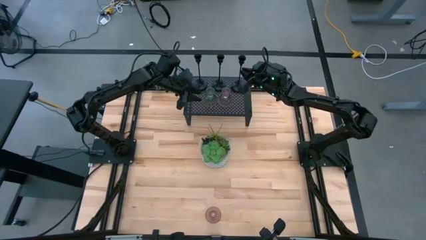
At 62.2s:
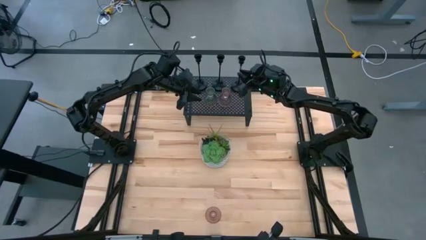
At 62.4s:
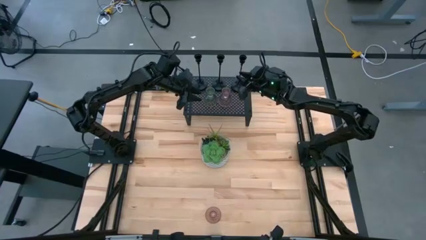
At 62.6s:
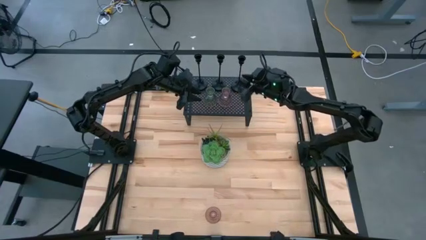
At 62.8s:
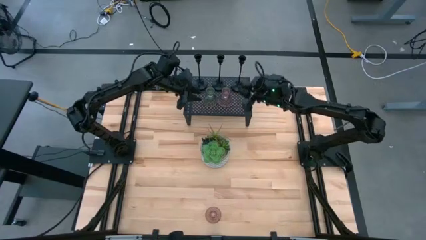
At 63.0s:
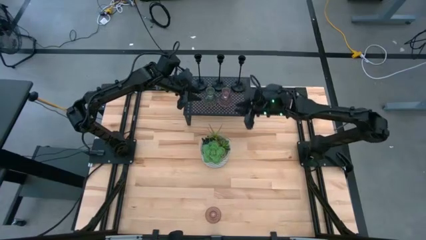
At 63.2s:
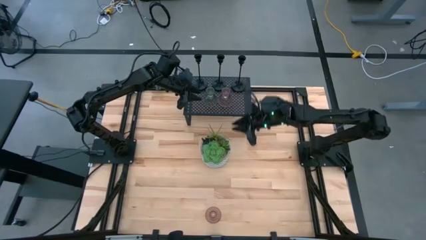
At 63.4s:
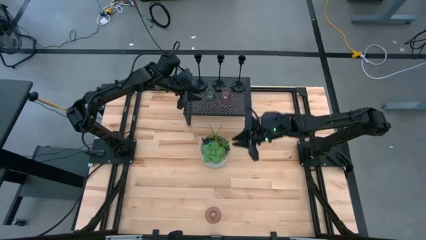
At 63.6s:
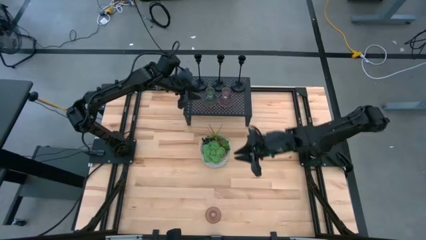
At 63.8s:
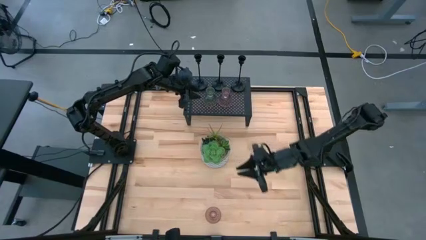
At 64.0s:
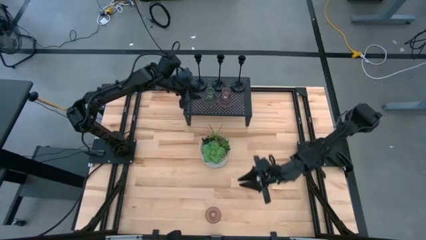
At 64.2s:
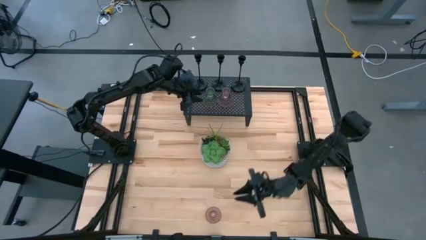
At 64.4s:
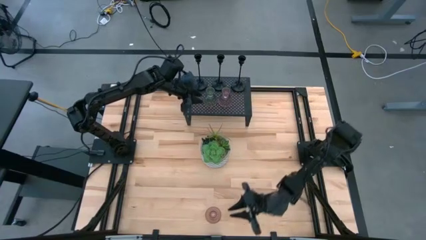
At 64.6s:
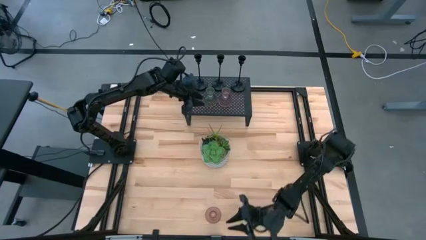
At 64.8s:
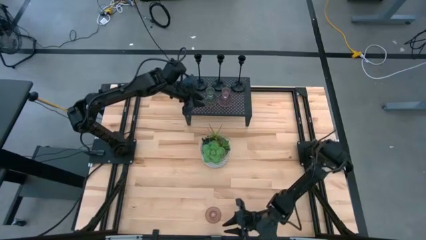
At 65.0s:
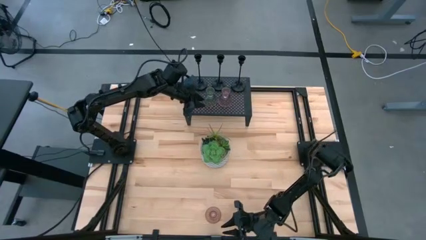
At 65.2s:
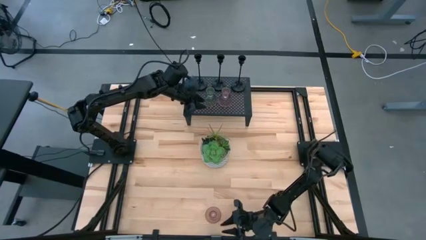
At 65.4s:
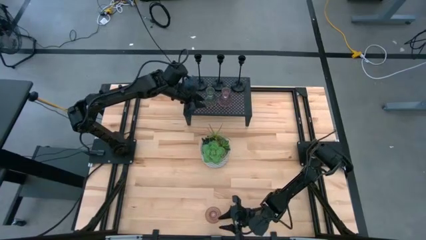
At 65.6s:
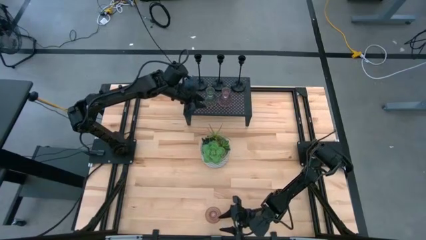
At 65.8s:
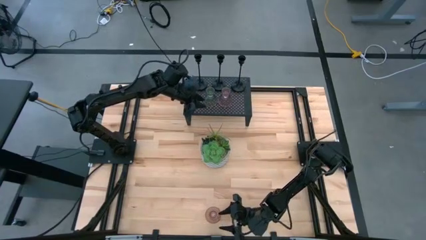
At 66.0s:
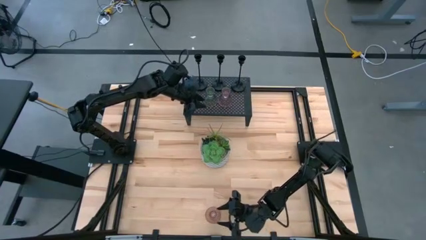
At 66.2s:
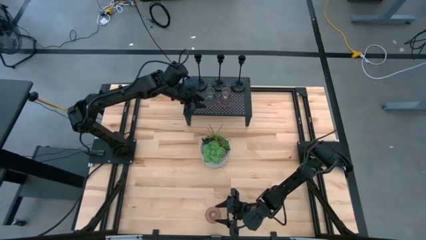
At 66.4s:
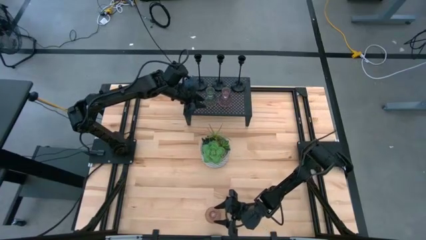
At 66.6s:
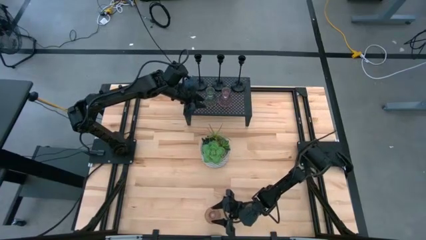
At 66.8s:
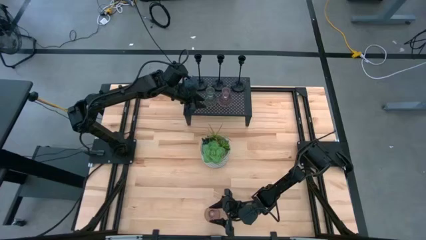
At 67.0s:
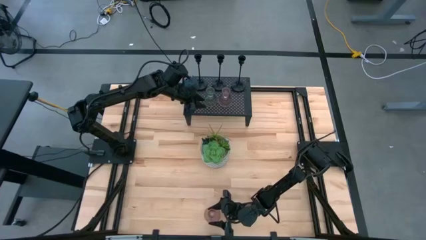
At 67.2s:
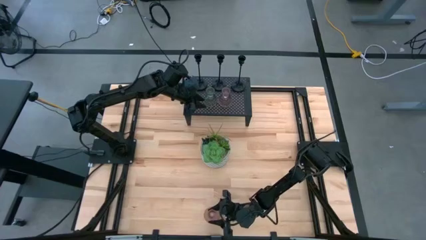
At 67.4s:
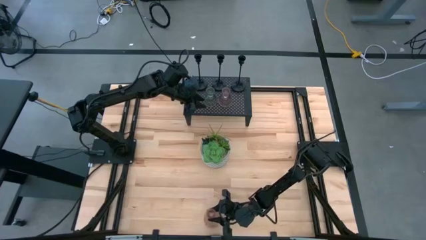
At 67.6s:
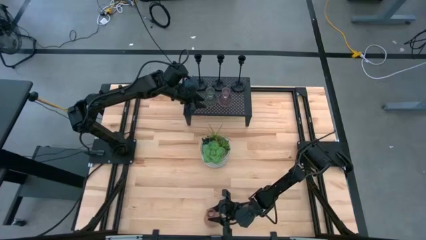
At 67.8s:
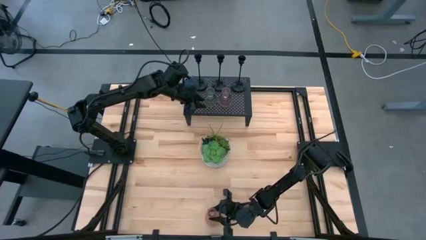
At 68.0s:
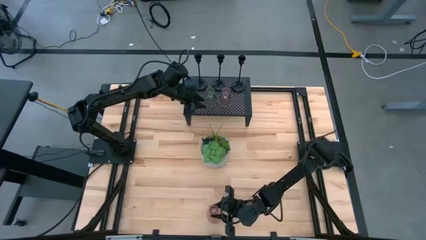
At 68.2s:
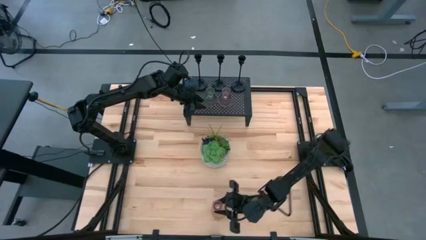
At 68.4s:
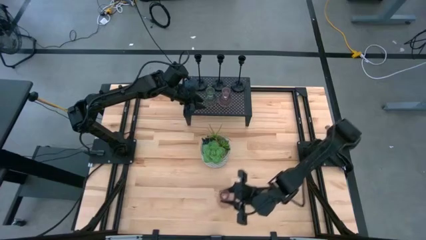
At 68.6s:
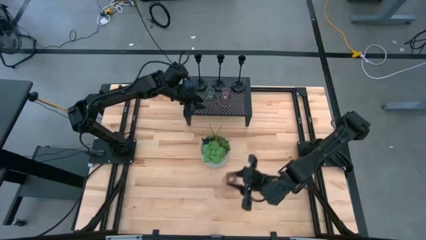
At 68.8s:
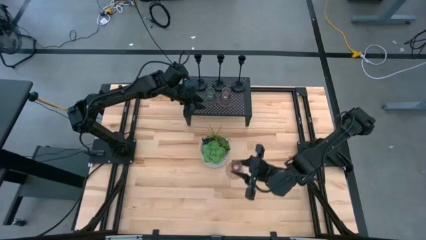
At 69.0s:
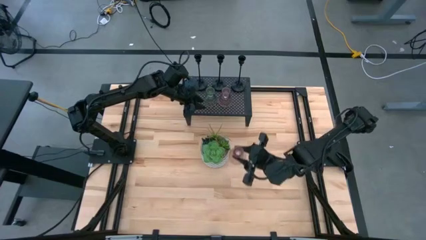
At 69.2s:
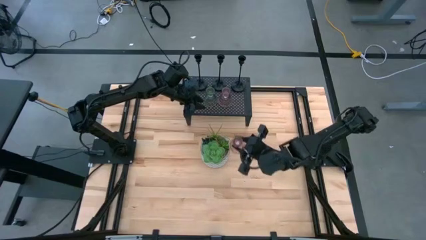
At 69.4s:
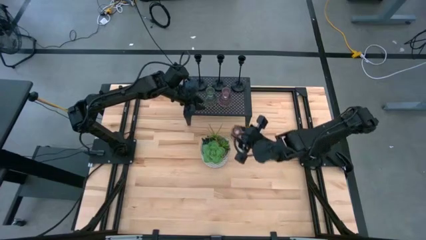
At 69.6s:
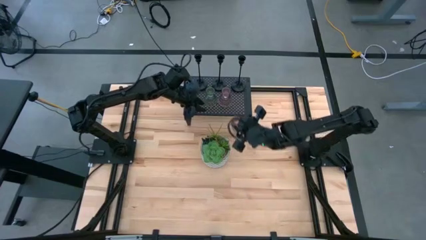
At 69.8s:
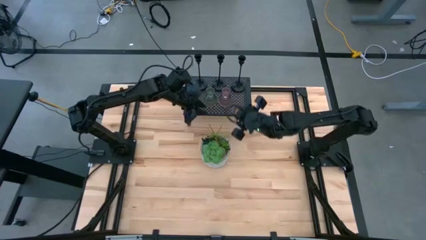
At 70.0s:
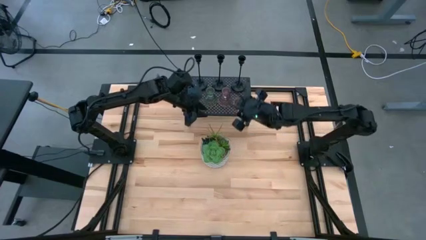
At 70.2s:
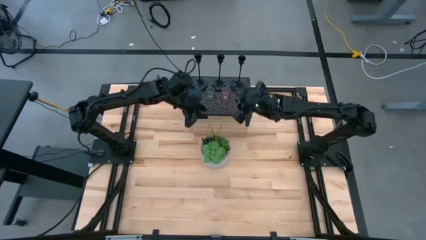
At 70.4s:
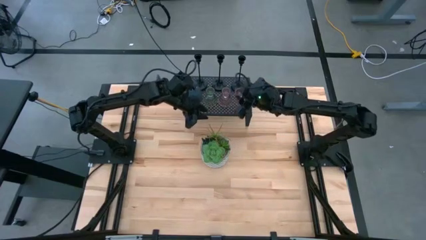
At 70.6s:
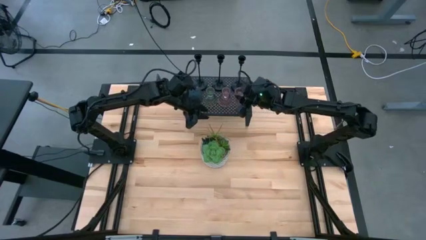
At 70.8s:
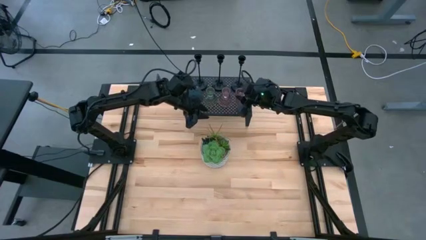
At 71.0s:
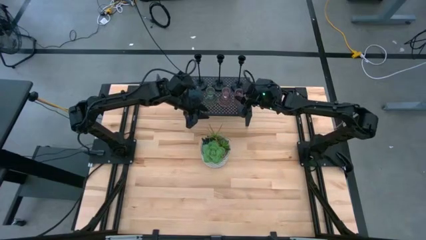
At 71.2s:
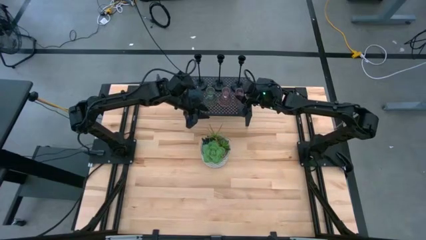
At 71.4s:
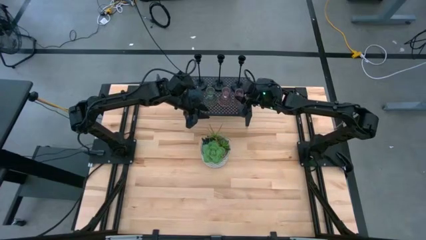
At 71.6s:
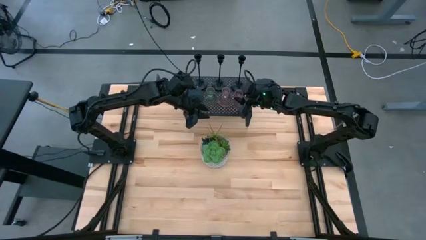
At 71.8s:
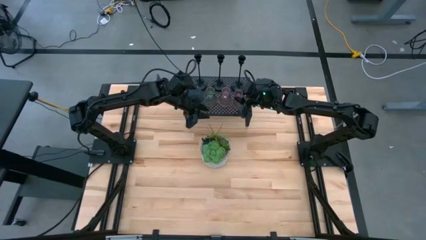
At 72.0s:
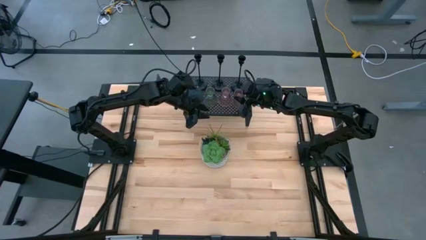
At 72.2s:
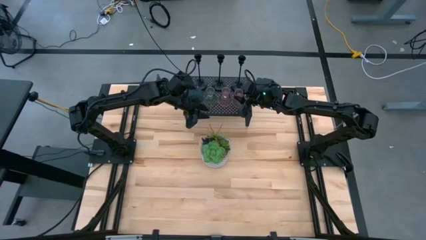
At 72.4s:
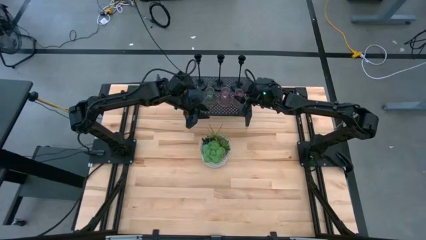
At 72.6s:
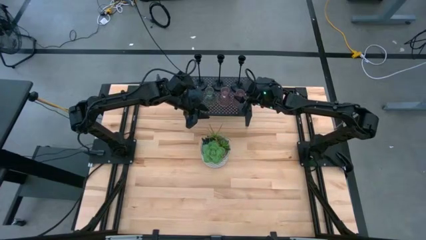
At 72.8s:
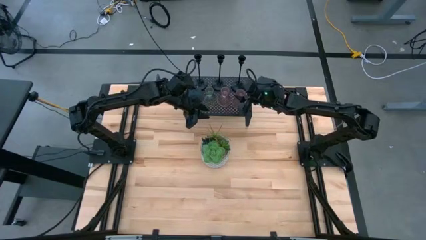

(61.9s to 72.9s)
Task: Pick & Place candle stick holders
Put the pink glass candle holder on the shelf aligned with the other pink and green glass candle holders

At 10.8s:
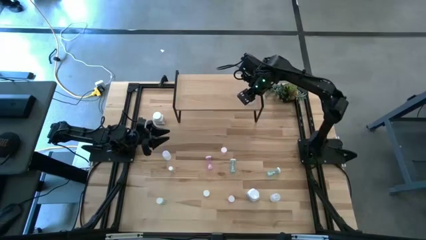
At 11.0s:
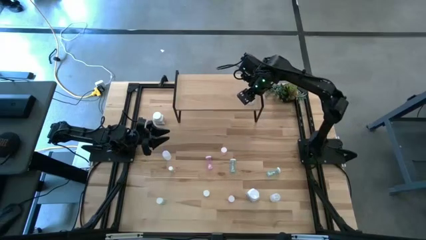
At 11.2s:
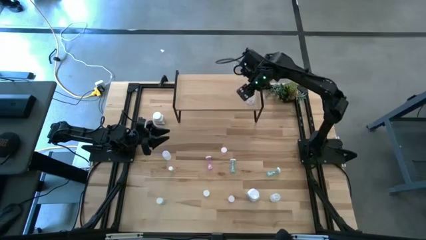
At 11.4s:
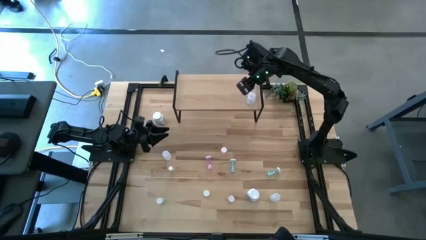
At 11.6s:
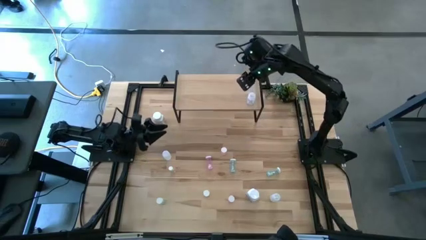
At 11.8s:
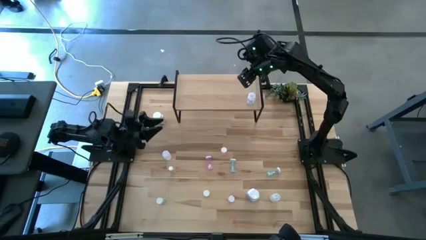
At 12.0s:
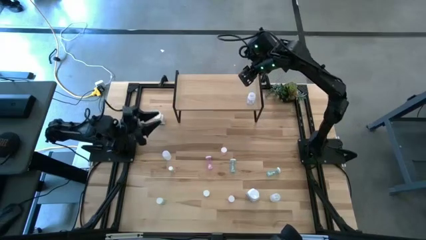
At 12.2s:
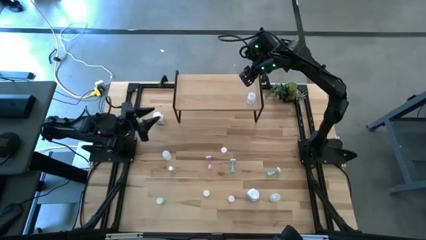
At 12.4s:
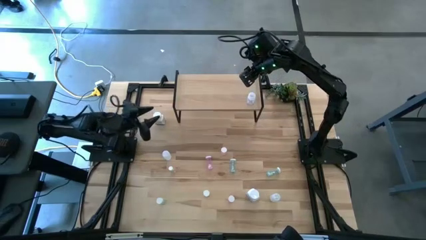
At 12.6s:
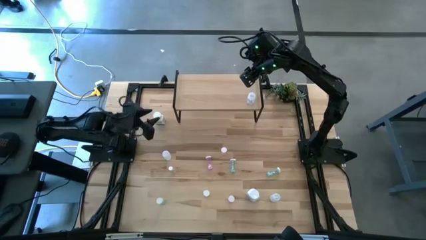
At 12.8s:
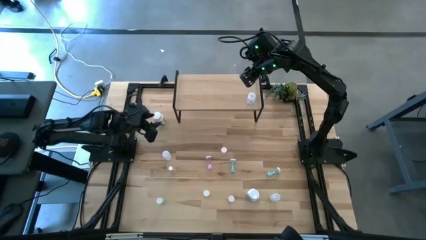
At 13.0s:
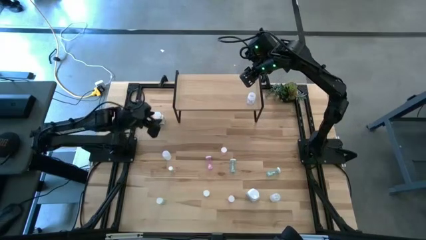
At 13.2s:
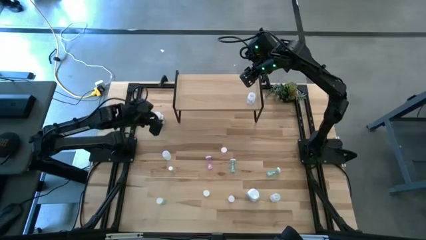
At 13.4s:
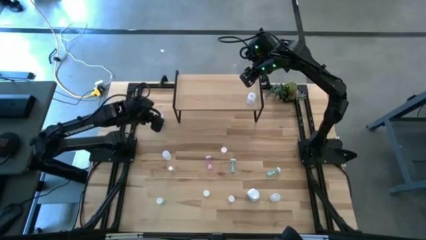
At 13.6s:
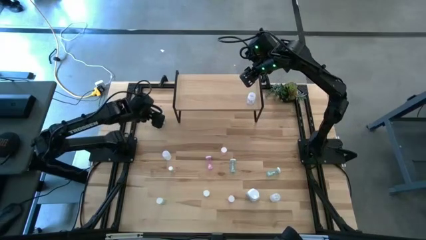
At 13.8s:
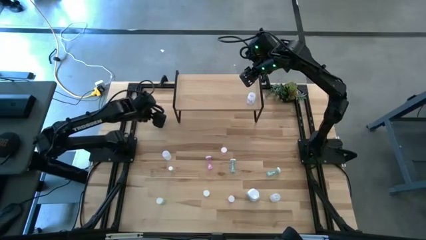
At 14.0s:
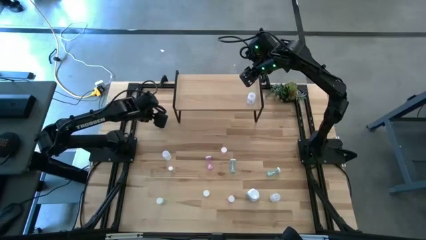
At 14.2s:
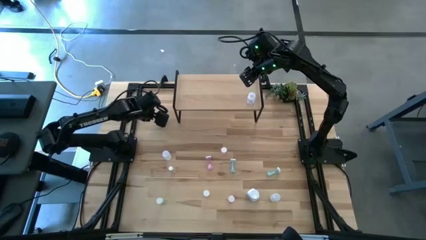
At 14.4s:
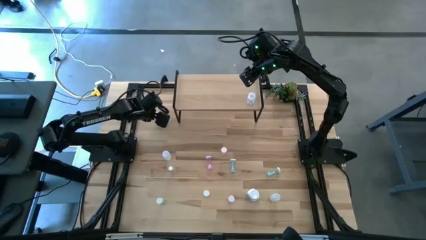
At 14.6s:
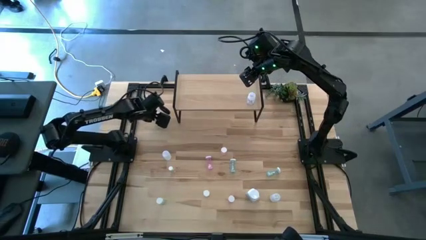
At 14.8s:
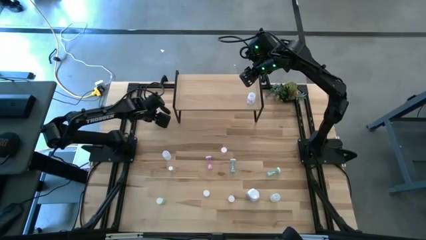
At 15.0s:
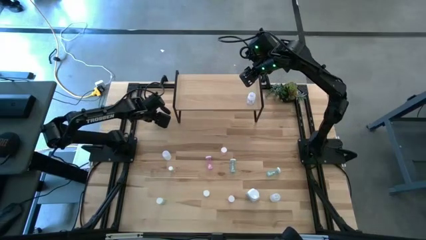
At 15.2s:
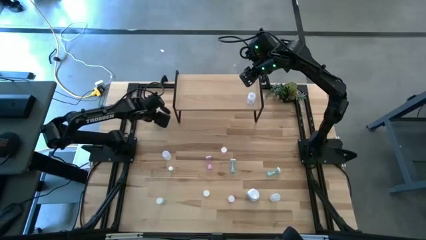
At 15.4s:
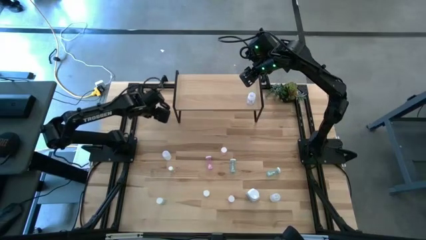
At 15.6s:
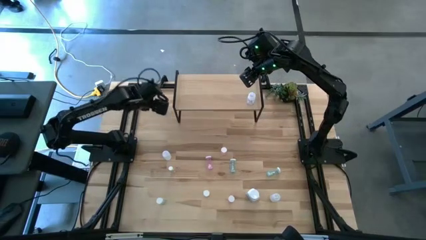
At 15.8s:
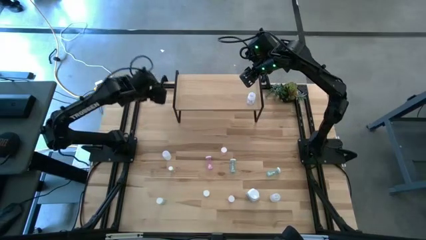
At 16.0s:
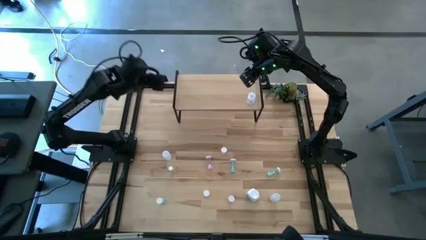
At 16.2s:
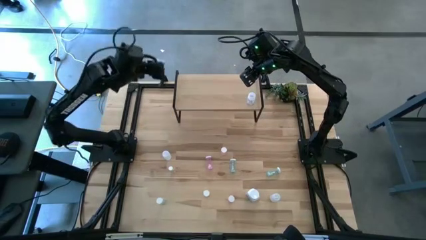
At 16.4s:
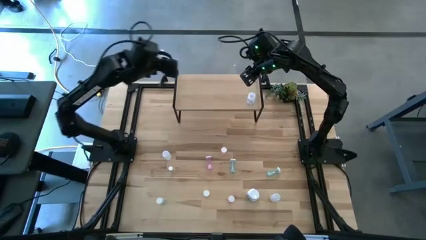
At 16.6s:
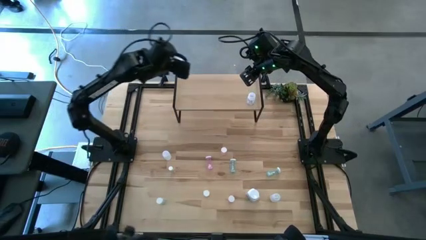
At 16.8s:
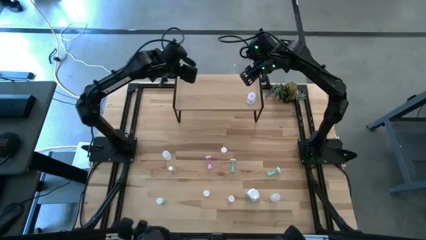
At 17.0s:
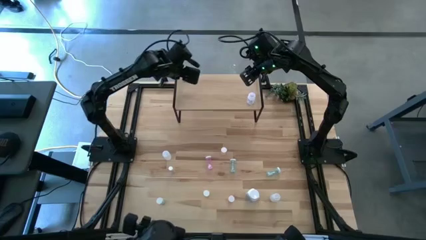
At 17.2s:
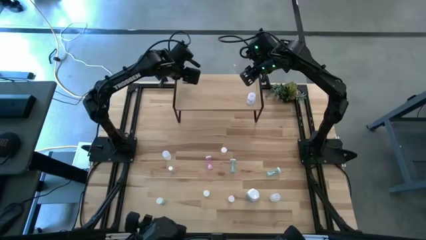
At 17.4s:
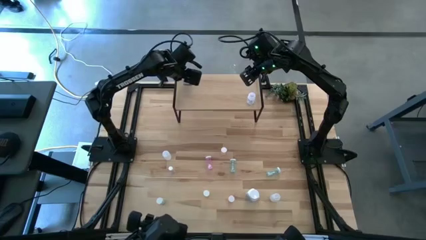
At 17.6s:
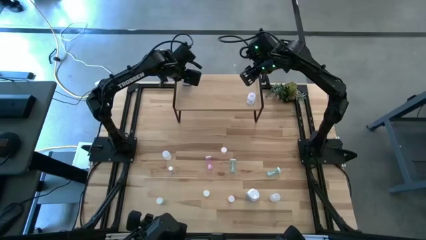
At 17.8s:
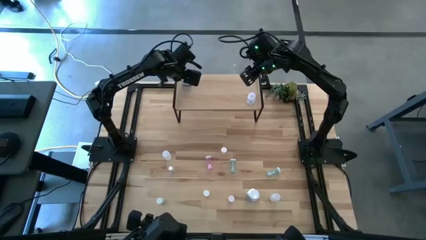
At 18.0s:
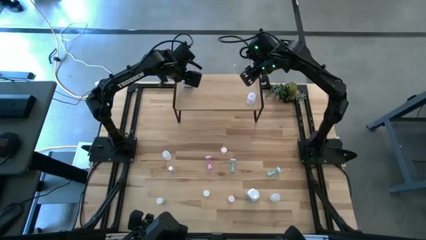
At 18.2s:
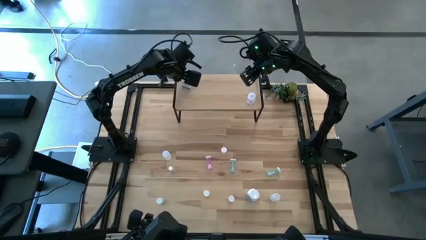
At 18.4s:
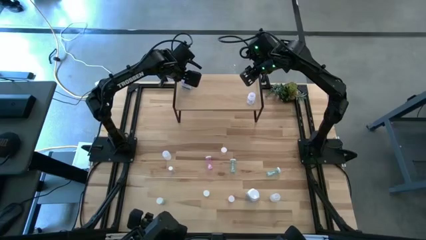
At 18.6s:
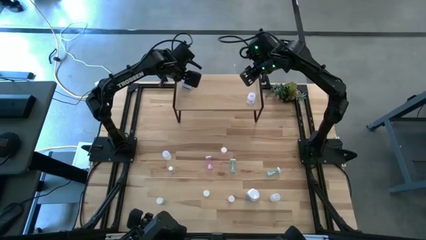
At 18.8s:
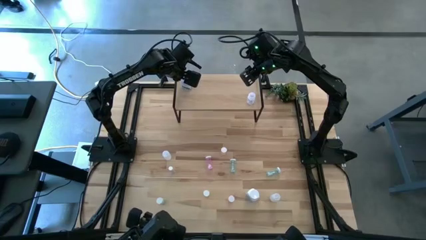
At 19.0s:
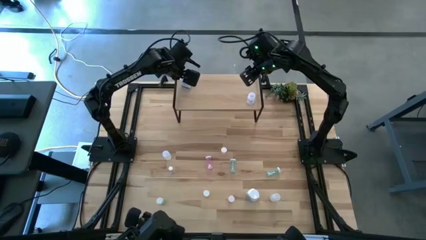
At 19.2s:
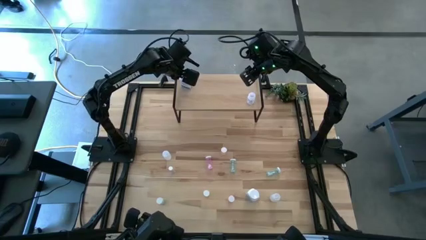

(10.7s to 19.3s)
Task: Pick and place medicine bottles onto shelf by color
Put the top white medicine bottle on the shelf
